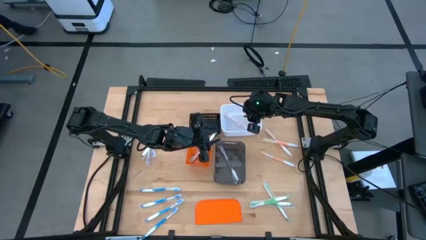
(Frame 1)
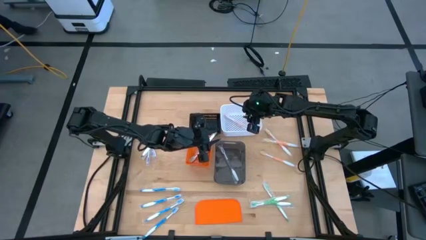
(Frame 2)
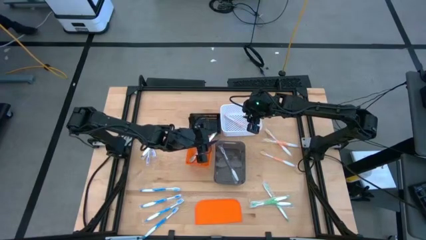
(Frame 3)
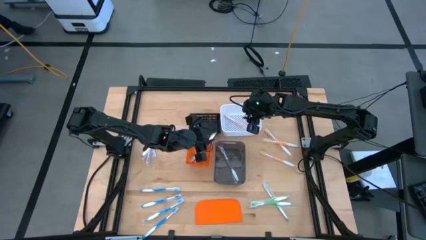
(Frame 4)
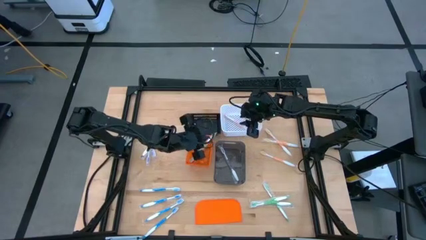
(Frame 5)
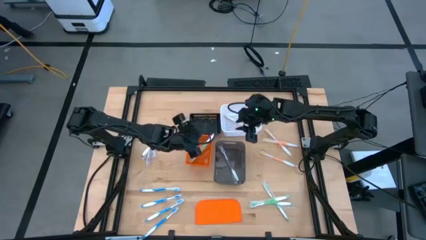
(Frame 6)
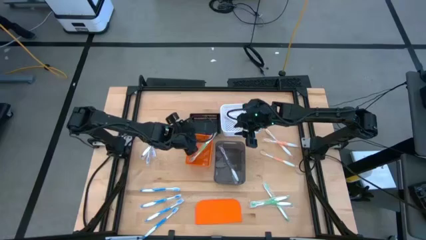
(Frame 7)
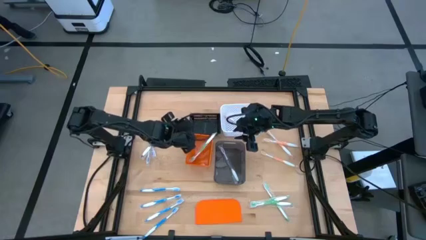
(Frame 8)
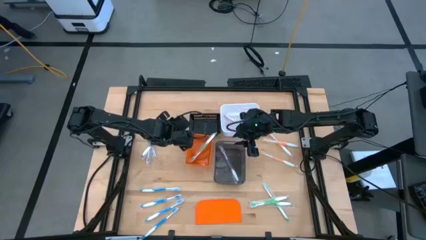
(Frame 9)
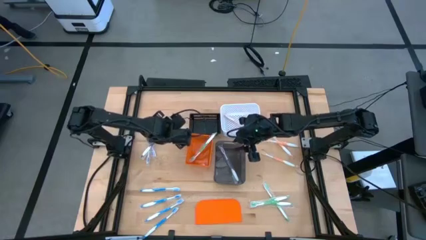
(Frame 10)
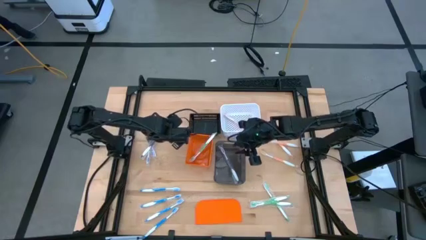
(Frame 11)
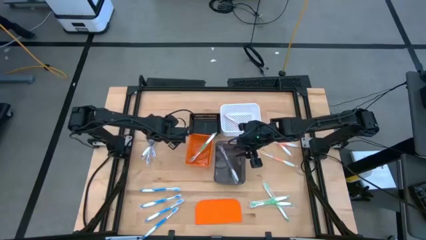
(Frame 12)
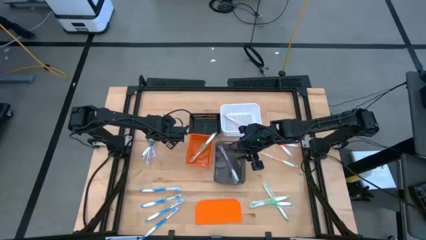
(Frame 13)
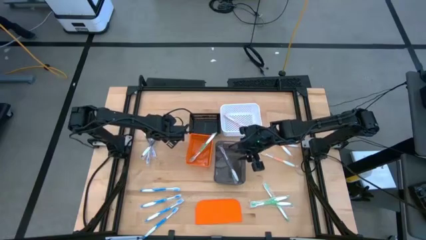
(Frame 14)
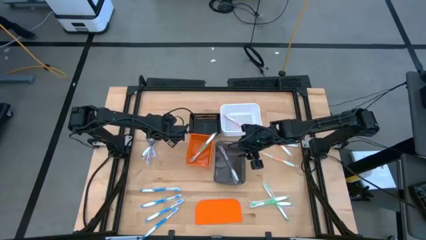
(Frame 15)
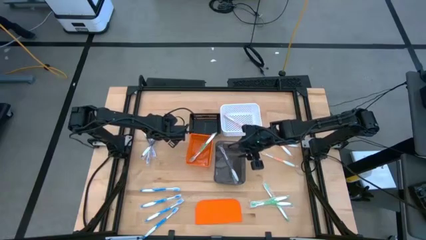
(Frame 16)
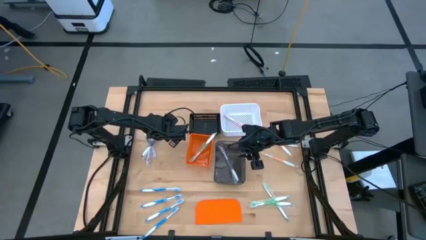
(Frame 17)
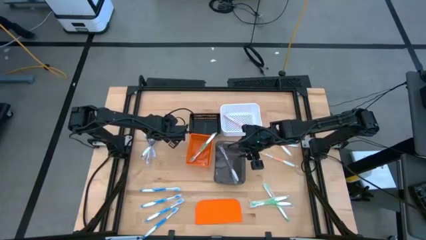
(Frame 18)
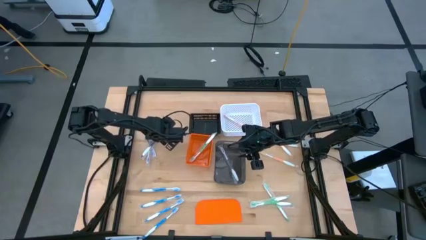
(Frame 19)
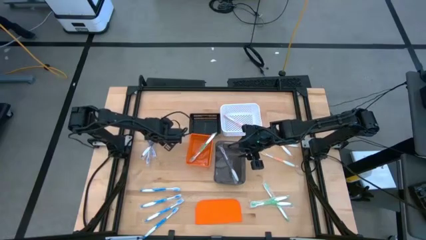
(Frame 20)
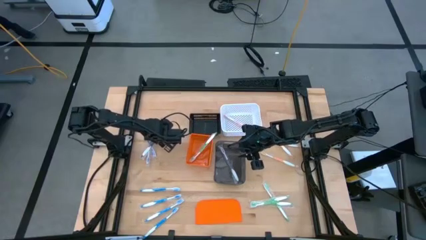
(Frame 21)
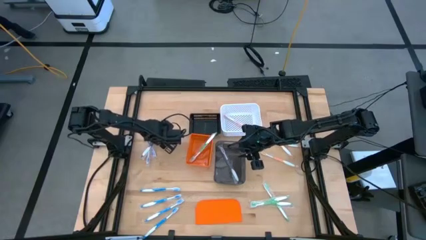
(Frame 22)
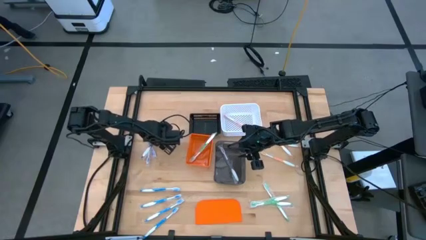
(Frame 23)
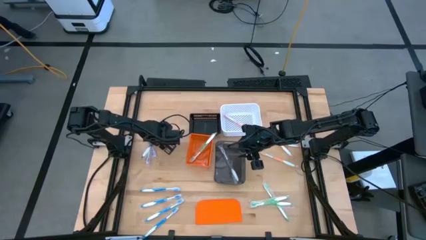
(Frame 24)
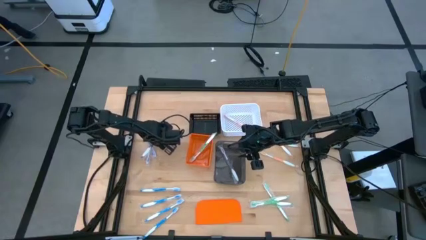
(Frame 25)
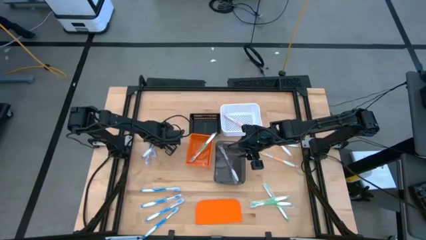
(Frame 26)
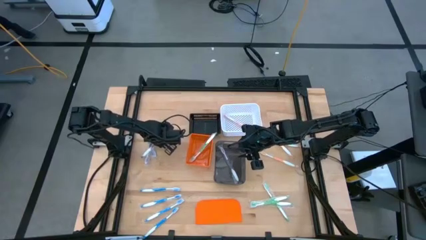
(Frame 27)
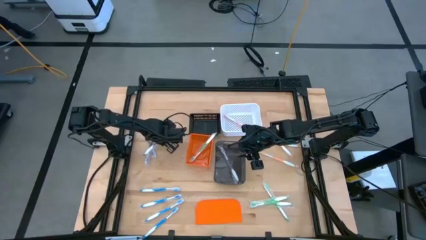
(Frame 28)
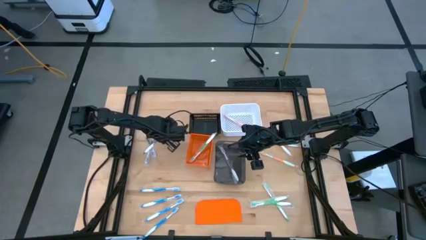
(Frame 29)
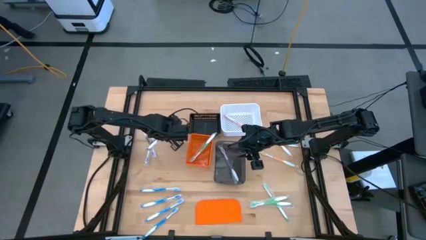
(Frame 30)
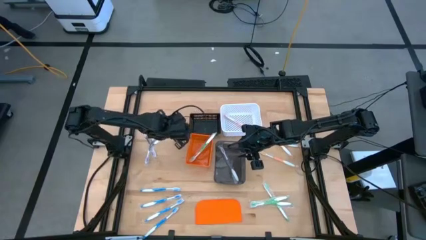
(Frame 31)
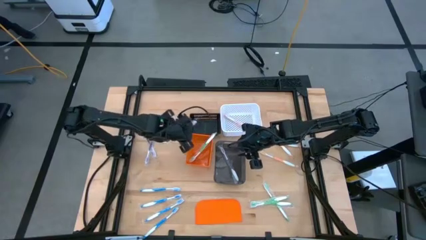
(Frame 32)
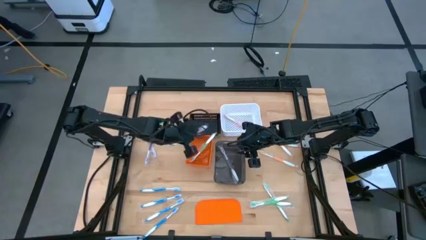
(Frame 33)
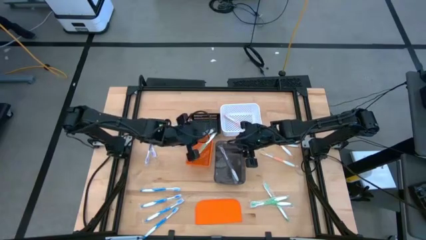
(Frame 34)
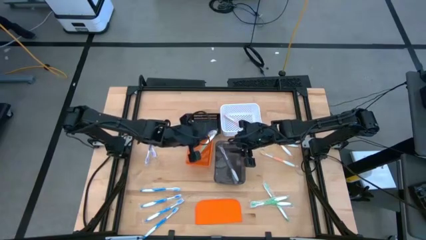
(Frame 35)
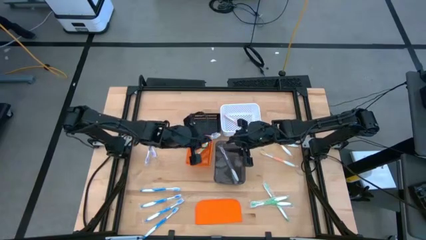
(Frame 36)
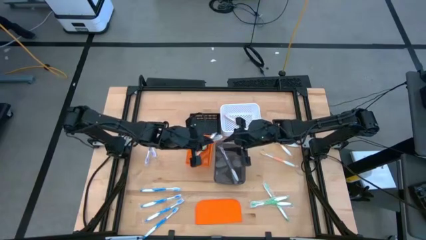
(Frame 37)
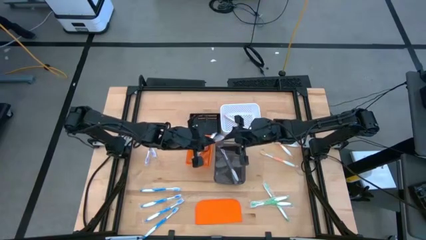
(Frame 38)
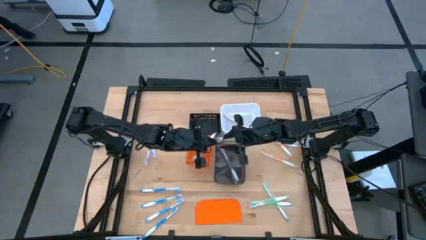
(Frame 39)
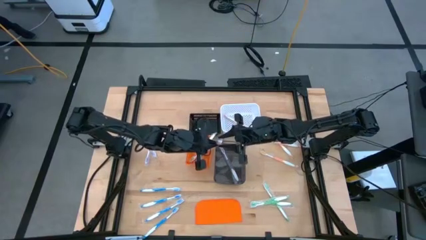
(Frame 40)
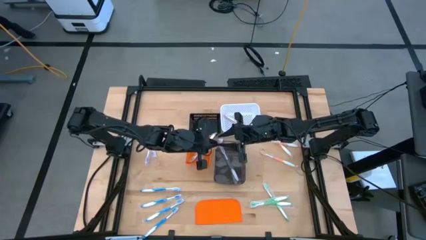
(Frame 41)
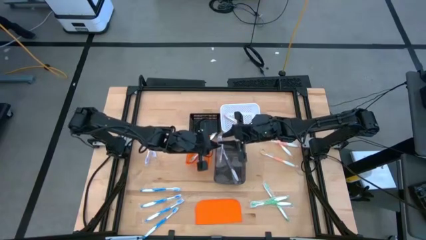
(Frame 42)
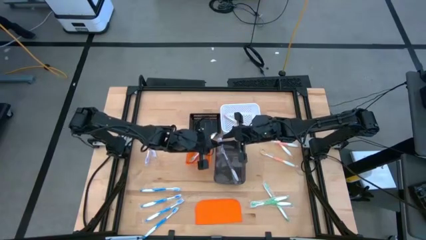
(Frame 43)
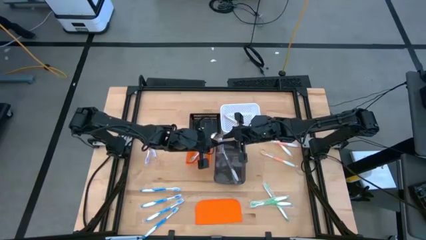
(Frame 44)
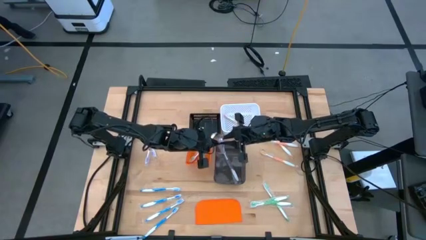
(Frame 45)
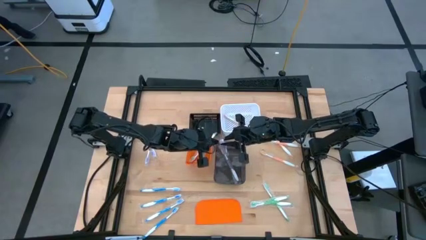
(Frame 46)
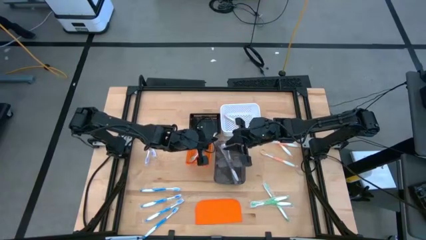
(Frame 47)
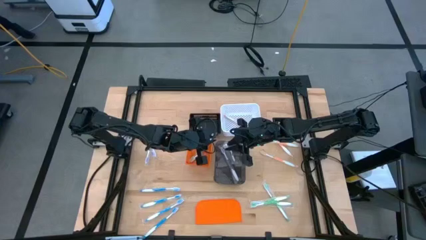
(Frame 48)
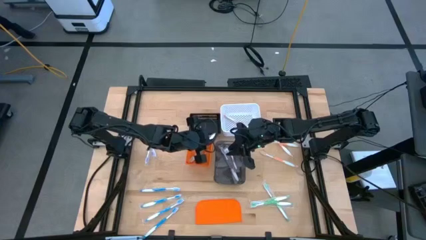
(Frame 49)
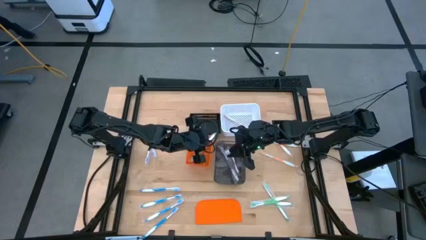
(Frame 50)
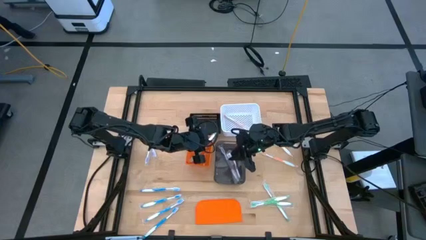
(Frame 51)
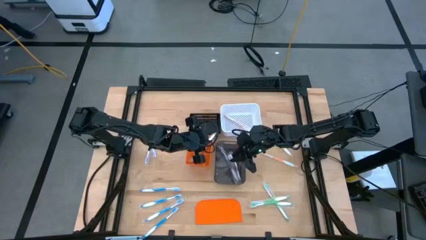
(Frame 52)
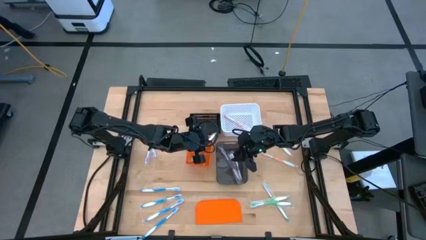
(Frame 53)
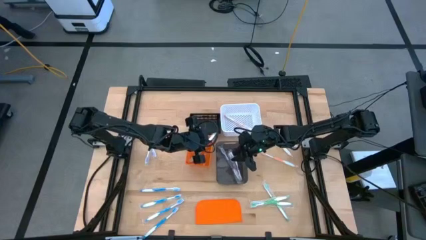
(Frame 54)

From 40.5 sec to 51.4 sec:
Task: Pick & Place Toothbrushes
Put the violet toothbrush into the transparent bin

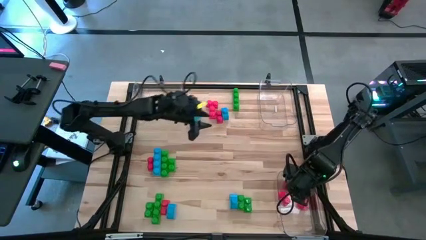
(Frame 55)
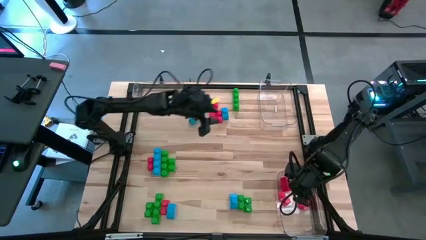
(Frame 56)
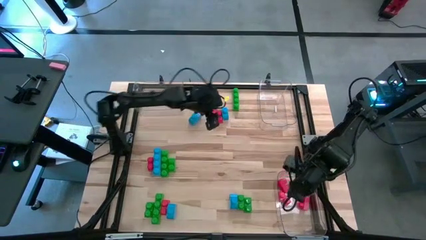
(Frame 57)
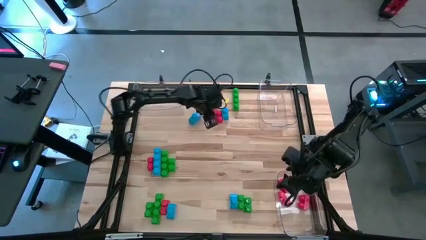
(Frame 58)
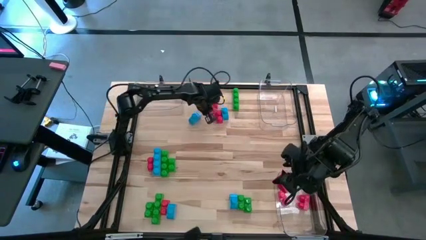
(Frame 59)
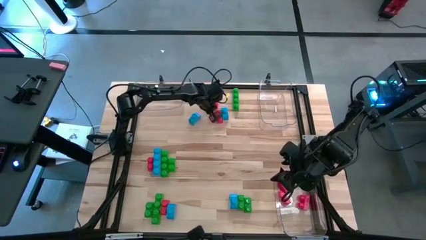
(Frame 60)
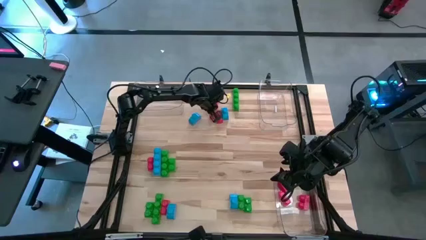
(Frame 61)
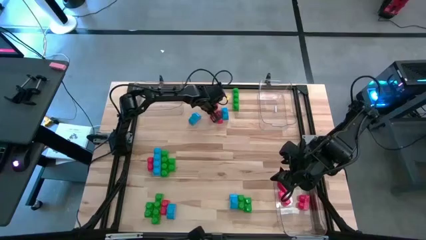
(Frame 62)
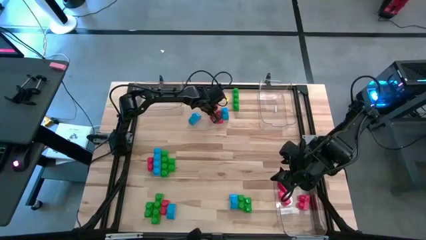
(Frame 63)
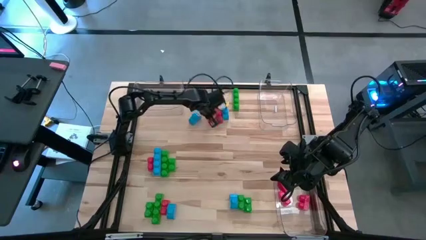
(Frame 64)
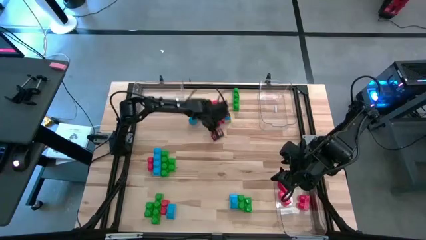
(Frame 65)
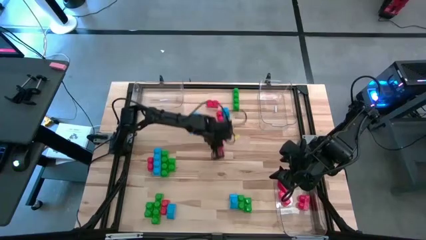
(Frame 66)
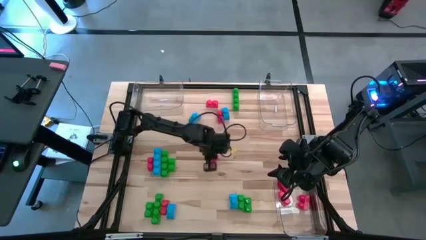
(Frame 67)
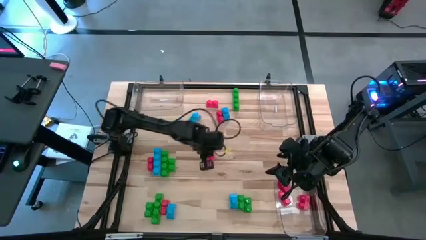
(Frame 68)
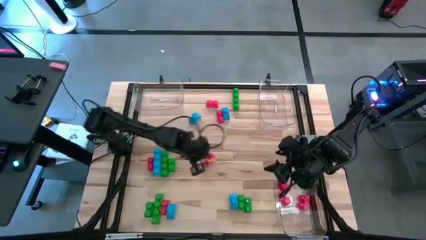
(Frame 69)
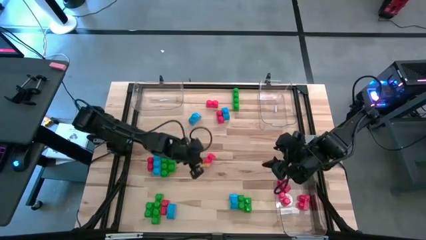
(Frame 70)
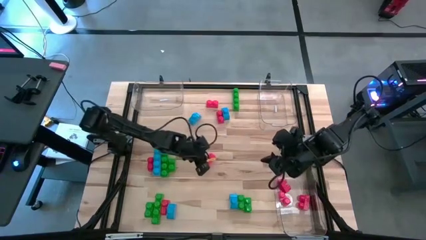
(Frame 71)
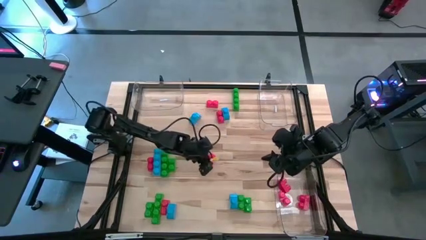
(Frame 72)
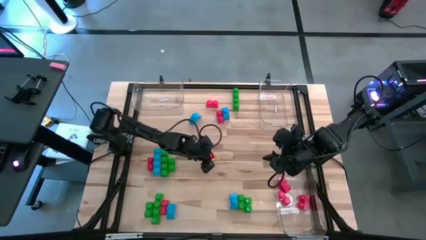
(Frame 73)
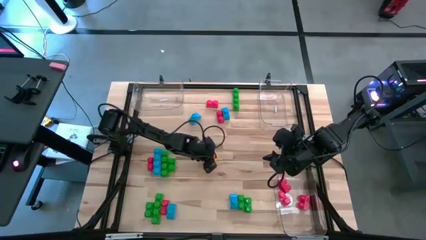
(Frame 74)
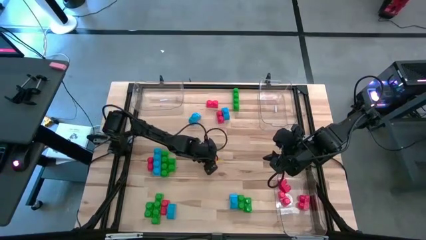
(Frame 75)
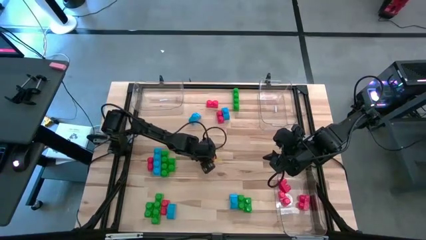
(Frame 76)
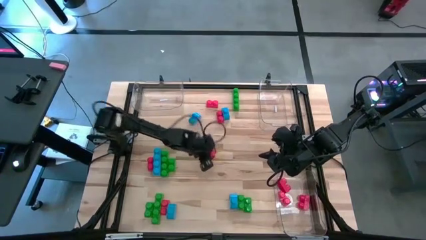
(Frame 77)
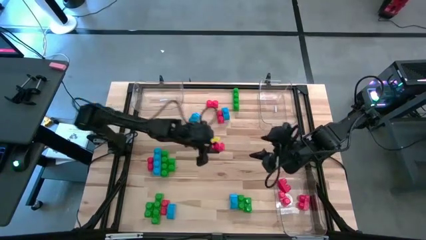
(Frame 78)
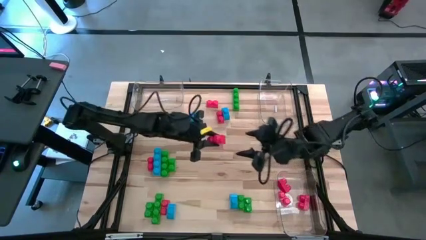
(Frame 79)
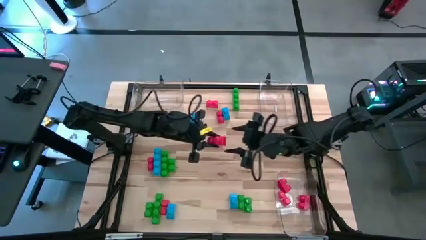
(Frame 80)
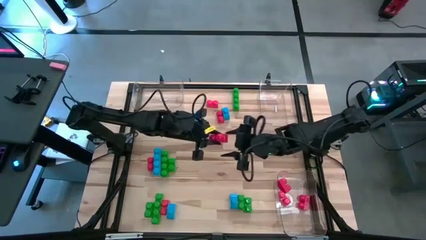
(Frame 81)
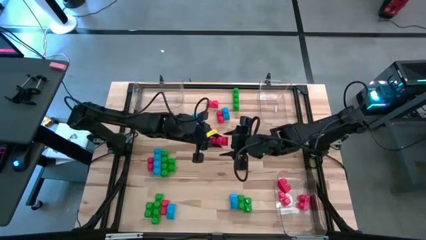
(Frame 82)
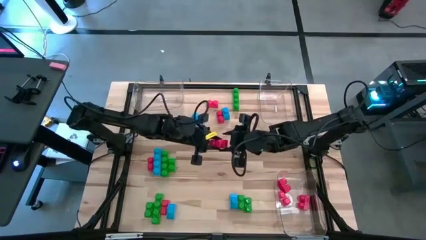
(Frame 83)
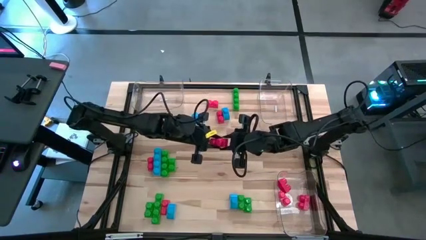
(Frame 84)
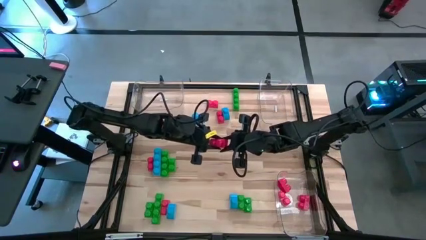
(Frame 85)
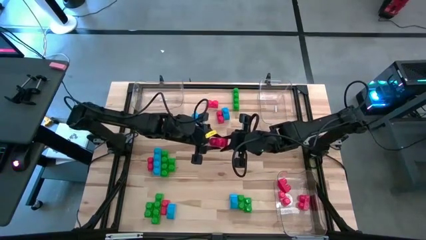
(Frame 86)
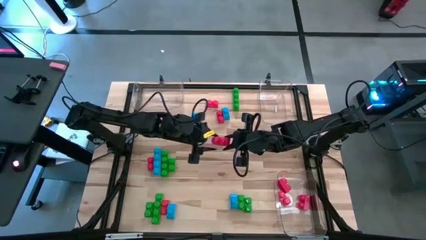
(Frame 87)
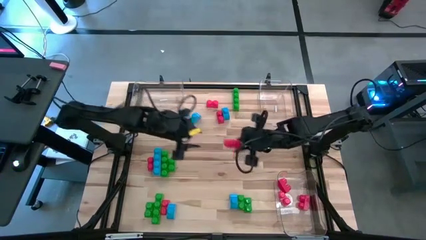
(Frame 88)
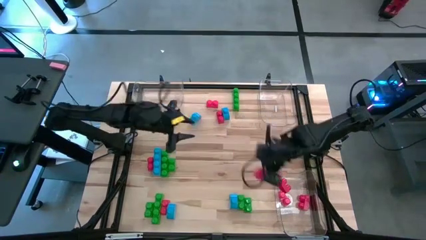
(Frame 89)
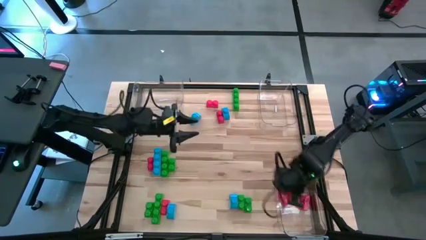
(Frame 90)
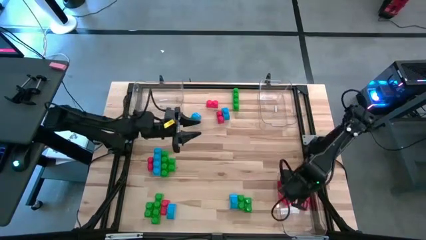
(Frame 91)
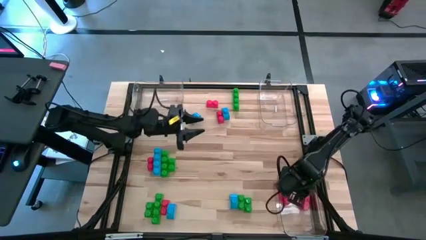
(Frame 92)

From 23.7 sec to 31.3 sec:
Task: Sort blocks
Put the red game piece into the bottom right transparent bin
